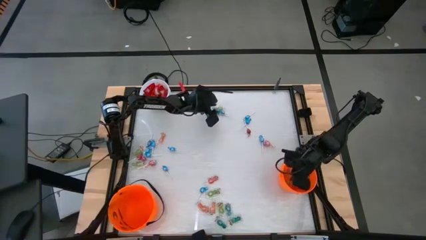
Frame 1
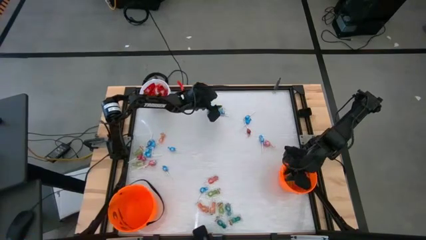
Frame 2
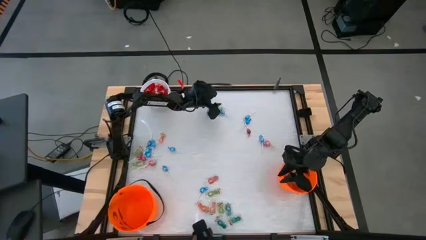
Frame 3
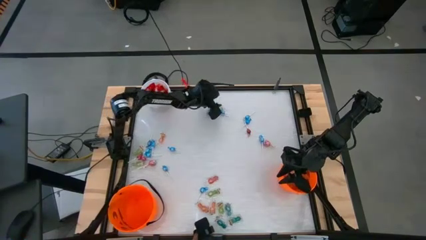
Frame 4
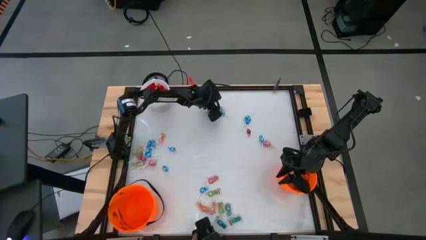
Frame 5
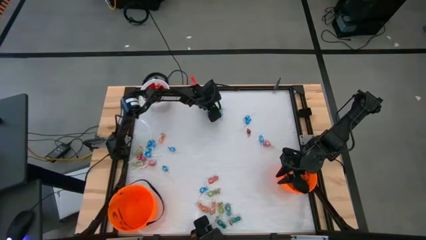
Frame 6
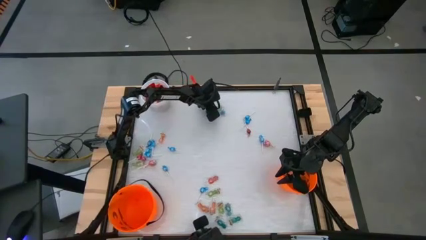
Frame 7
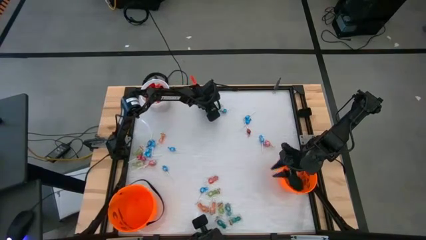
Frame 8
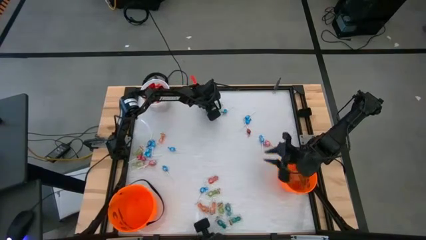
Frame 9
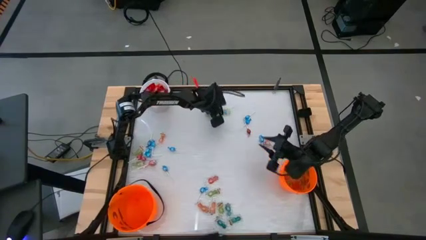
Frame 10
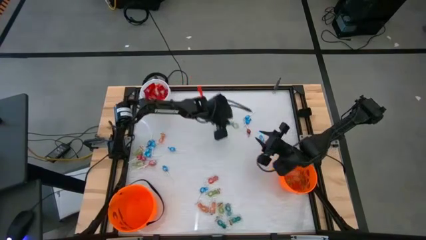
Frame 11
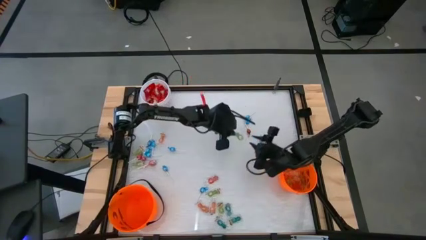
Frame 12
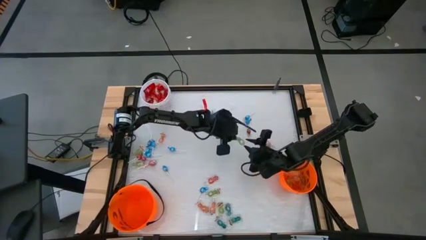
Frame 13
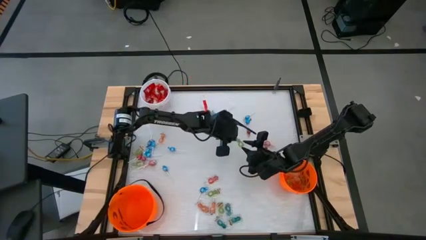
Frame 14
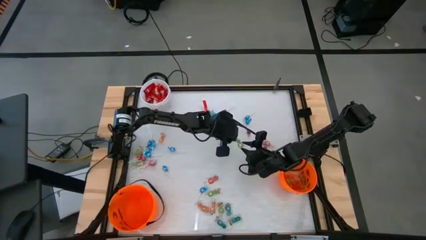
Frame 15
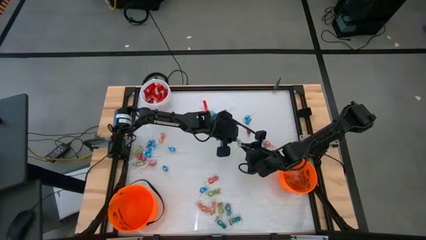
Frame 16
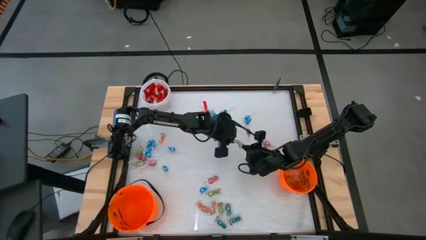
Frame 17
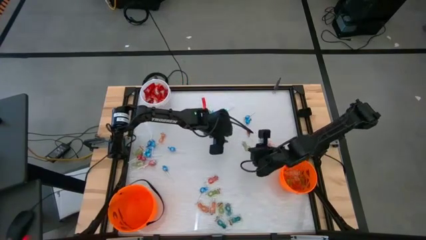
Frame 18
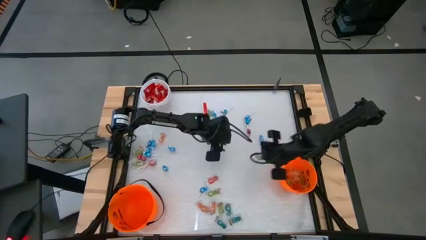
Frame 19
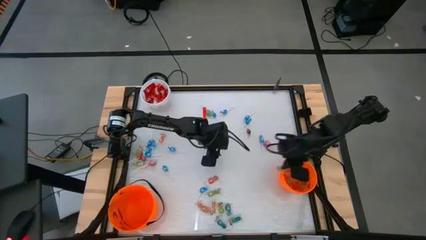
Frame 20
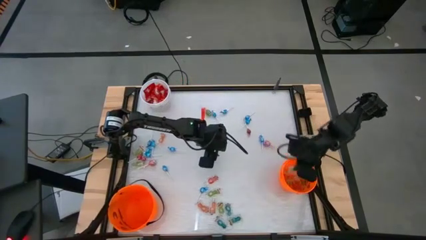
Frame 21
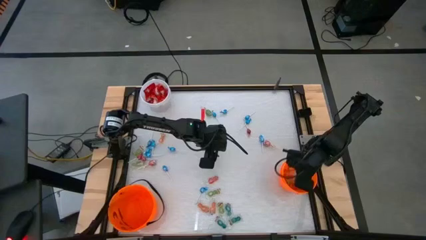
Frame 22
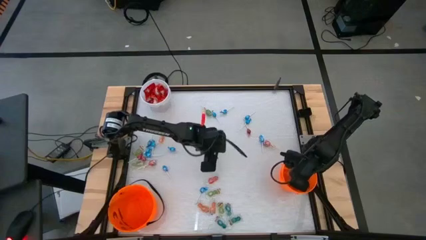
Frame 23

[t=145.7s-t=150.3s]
Task: Sort candy by brand, put in halloween buckets
Put the top green candy into the right orange bucket

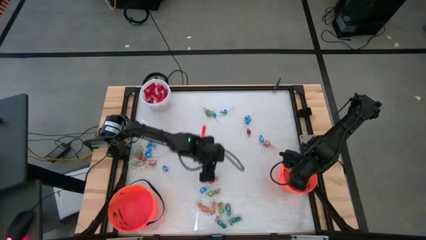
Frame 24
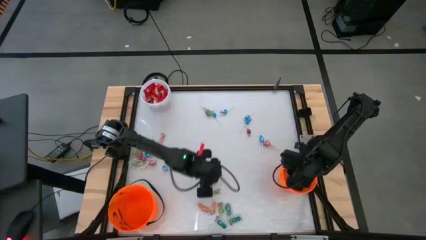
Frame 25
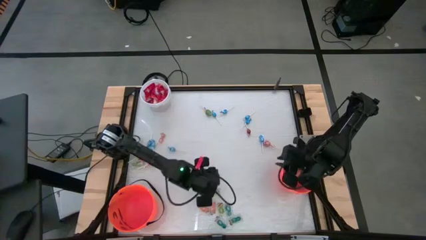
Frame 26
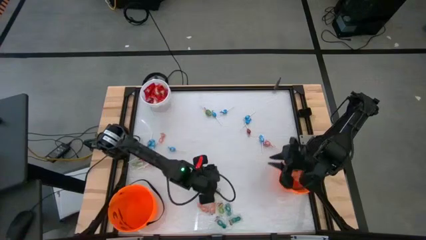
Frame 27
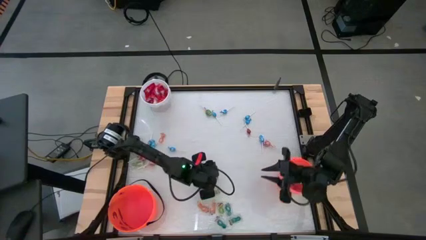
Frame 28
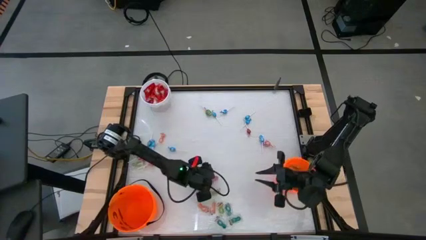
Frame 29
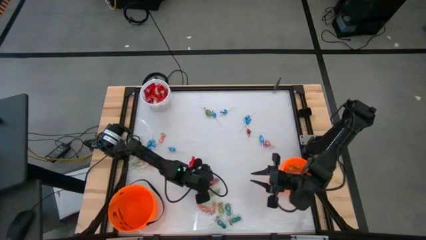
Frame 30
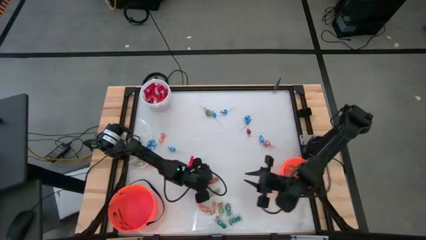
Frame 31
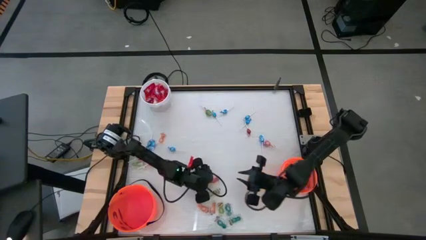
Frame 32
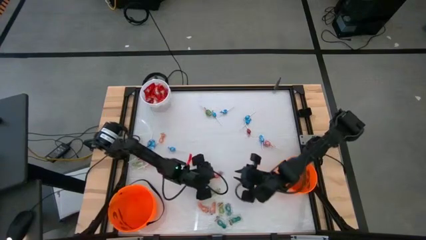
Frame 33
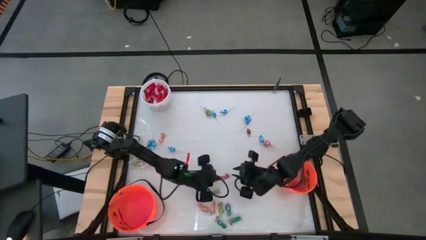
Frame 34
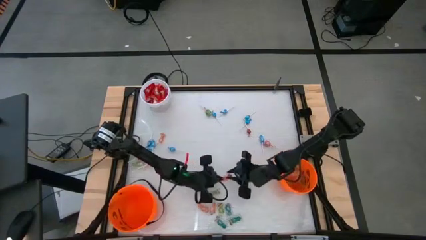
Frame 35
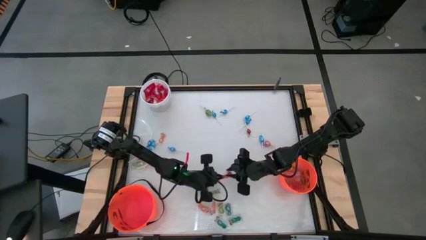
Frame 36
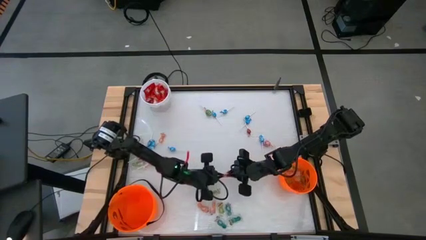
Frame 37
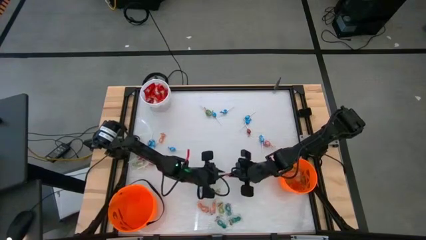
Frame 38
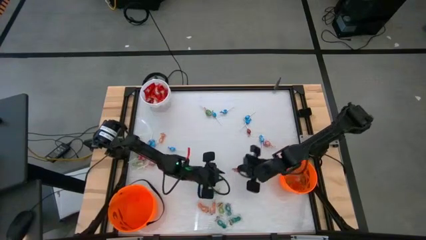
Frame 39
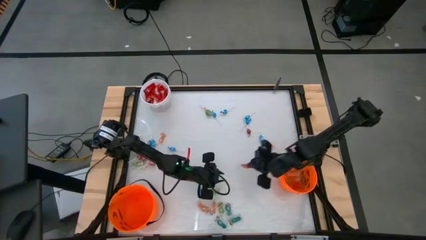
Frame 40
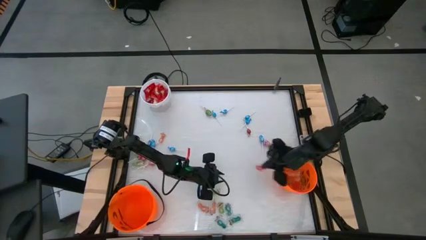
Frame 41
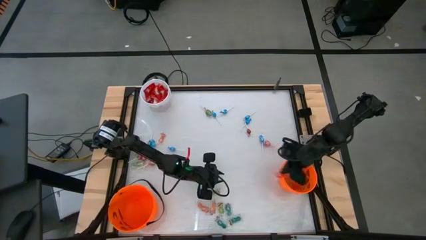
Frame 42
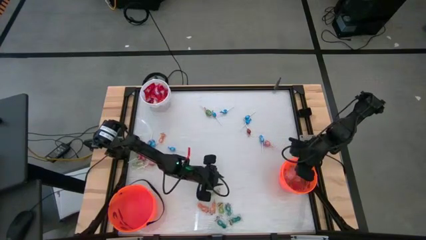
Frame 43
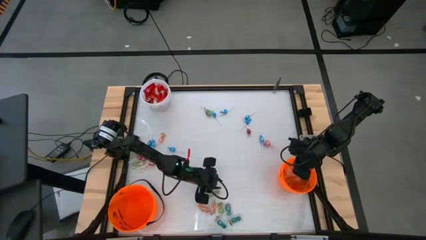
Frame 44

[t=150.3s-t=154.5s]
Put the orange candy into the right orange bin

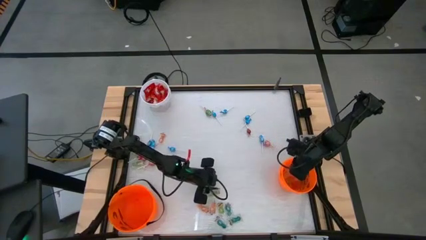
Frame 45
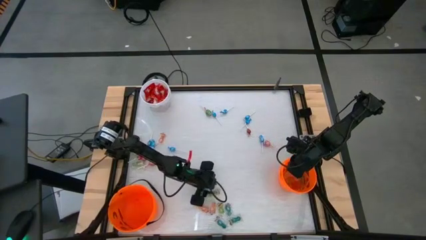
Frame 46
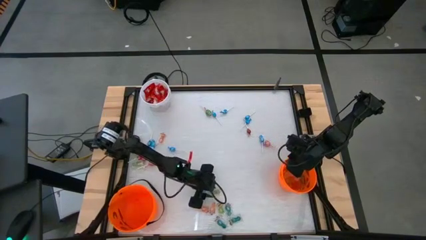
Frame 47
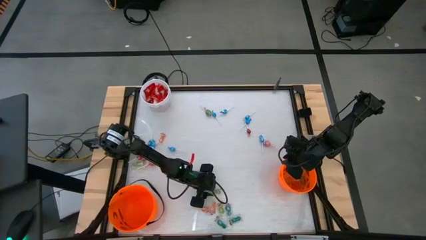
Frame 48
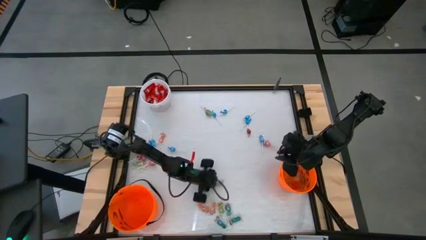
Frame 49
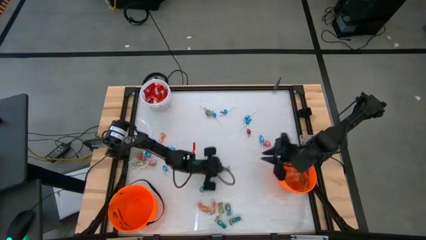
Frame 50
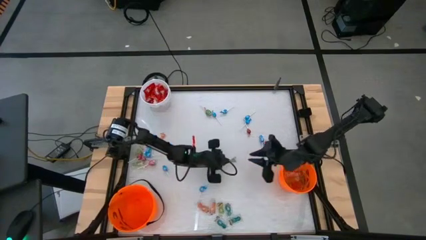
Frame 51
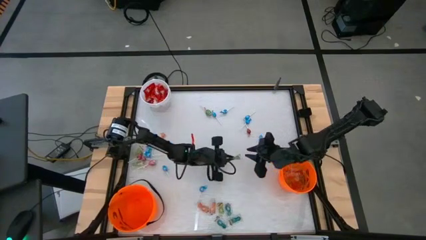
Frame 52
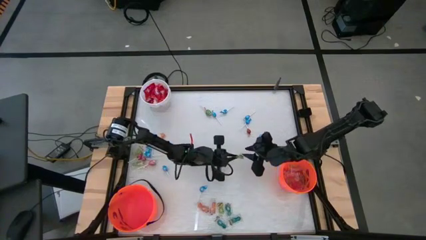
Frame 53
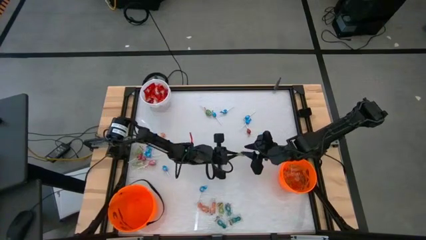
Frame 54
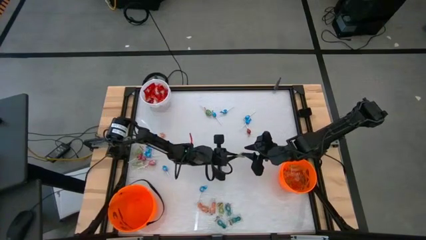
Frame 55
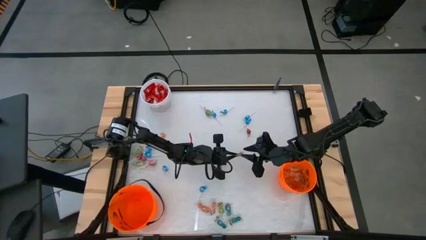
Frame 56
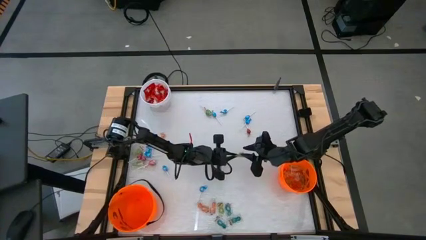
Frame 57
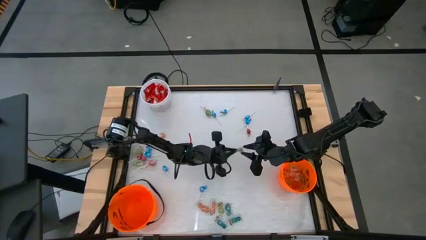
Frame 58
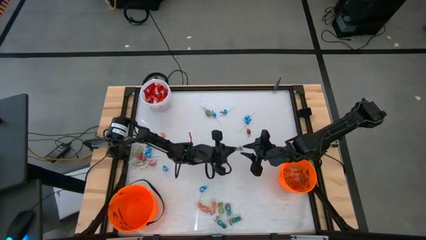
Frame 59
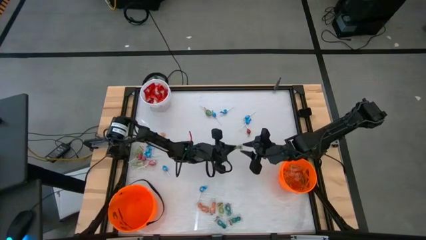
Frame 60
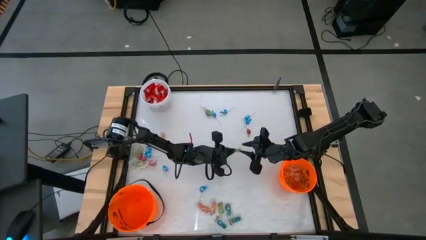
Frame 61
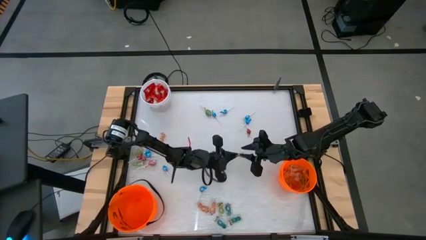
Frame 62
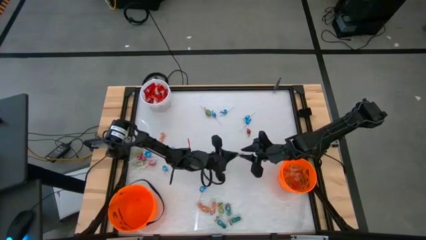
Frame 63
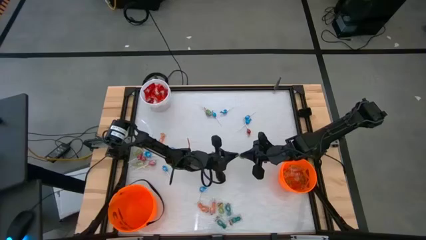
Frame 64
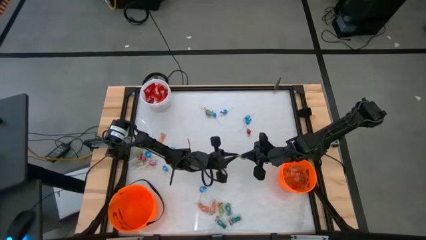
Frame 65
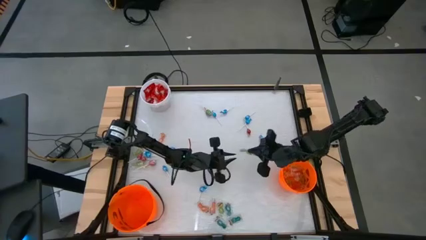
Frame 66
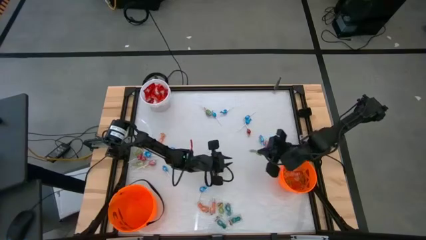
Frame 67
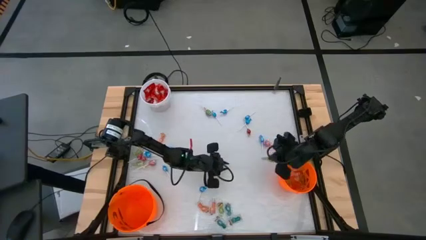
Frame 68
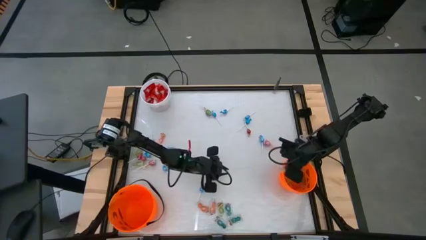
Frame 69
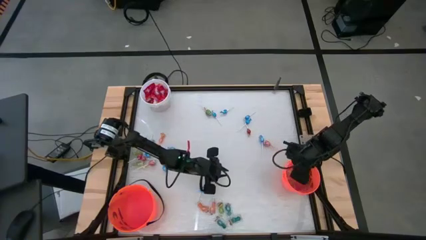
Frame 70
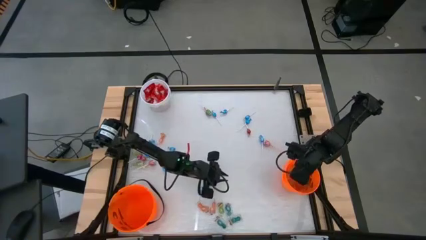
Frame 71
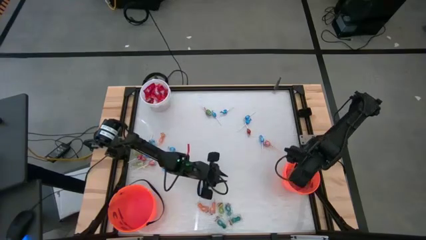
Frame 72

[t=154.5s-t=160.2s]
Put the top green candy into the right orange bucket

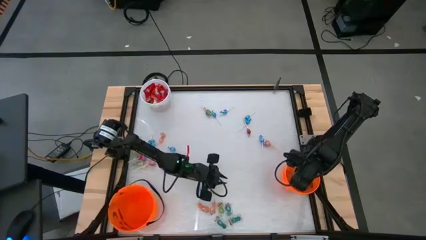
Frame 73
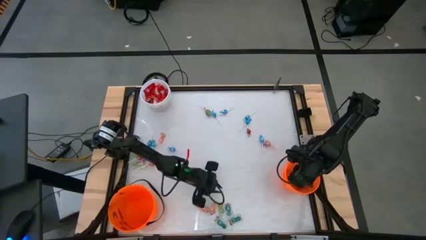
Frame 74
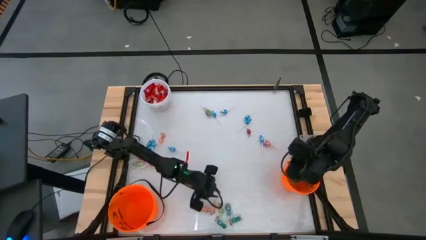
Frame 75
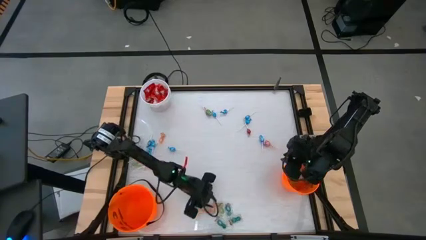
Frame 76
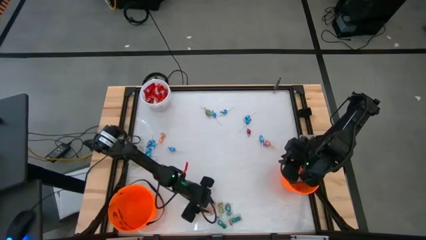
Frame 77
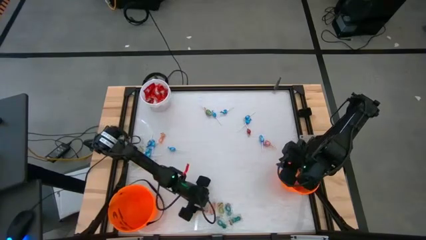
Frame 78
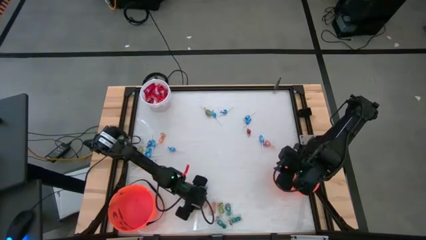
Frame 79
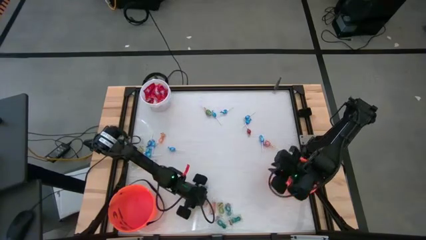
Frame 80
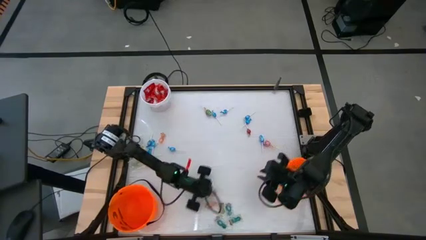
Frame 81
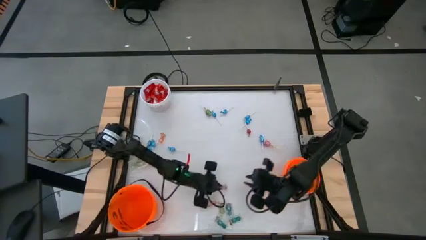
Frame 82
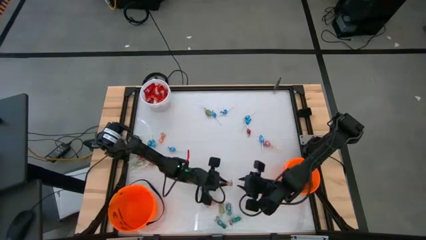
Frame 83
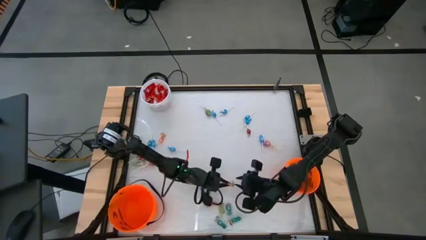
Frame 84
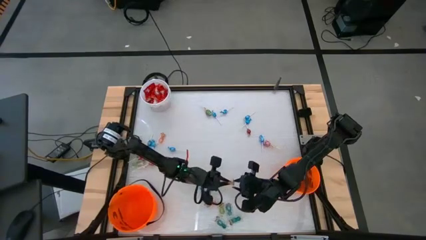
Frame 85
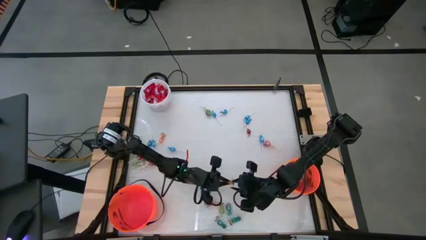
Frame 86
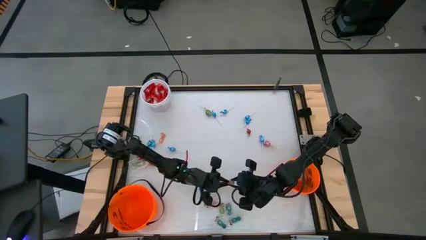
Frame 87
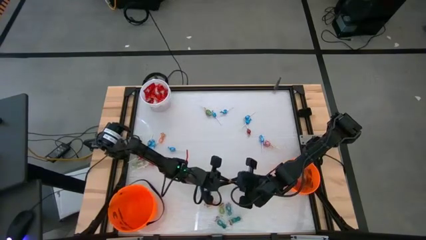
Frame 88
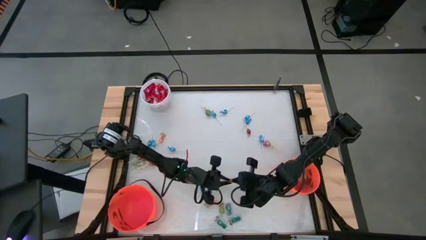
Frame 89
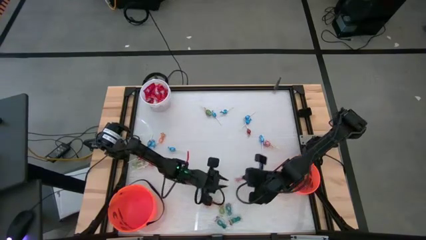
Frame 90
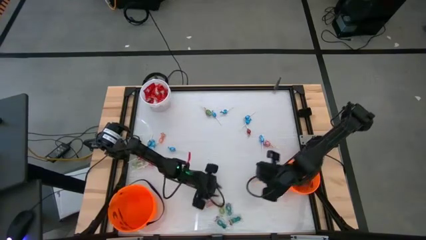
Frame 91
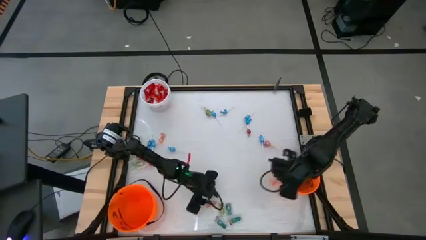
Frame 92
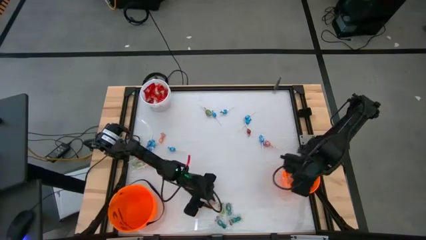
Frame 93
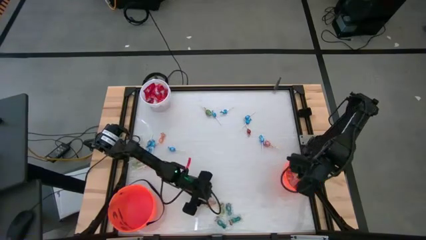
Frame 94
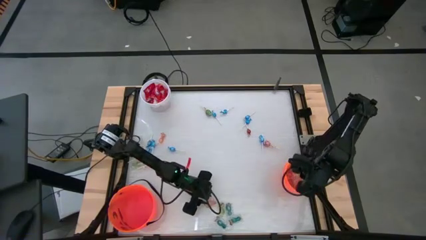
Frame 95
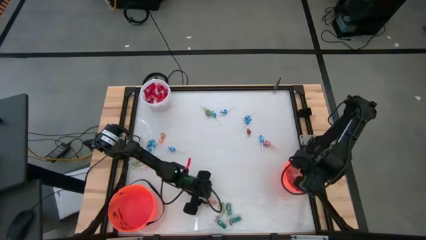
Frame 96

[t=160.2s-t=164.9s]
Put the bottom middle orange candy into the right orange bucket
